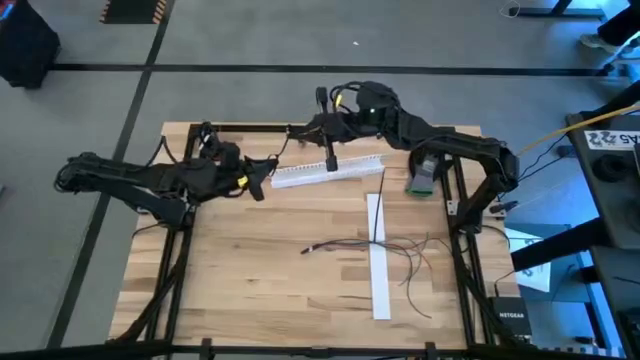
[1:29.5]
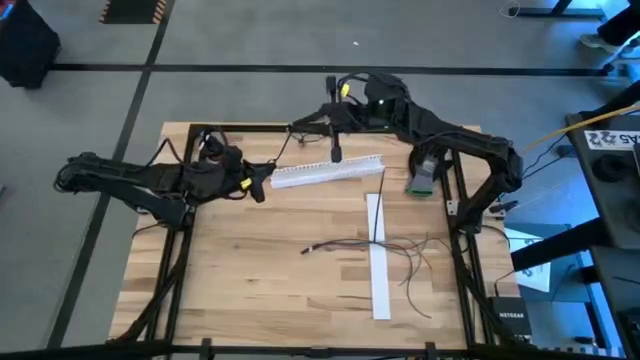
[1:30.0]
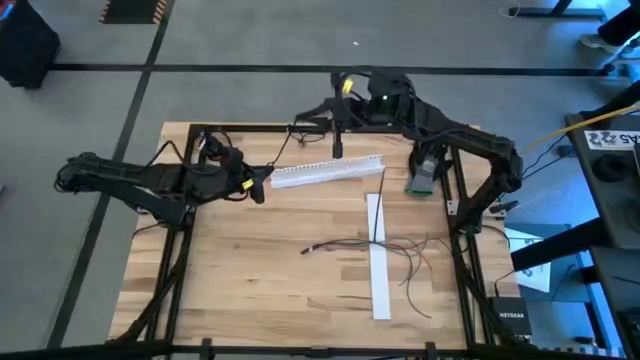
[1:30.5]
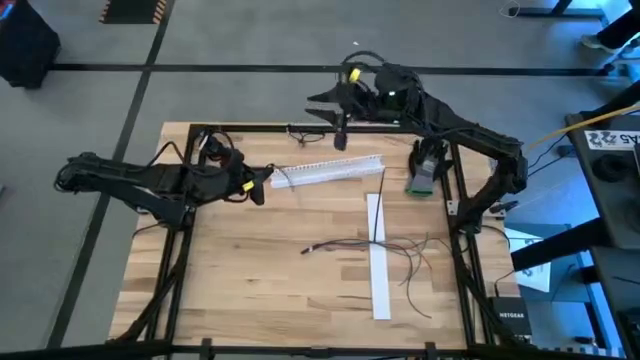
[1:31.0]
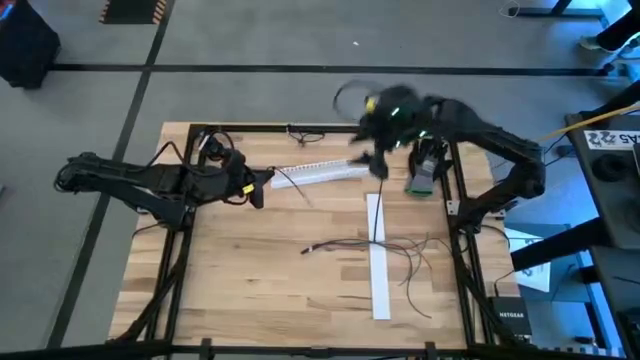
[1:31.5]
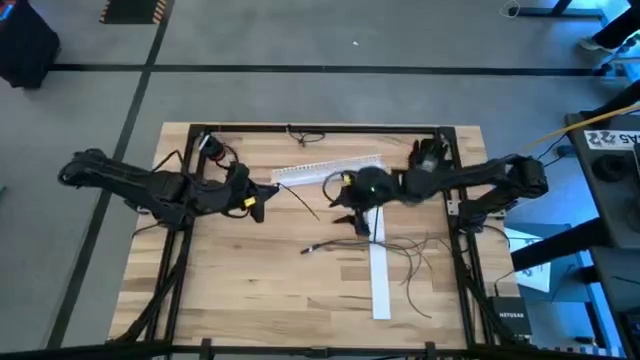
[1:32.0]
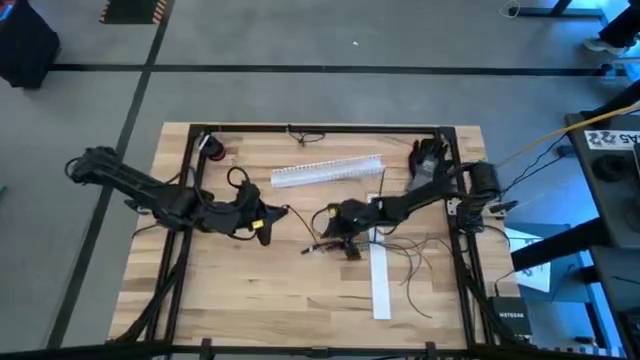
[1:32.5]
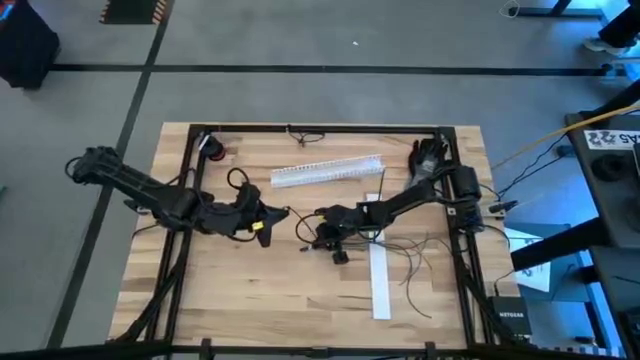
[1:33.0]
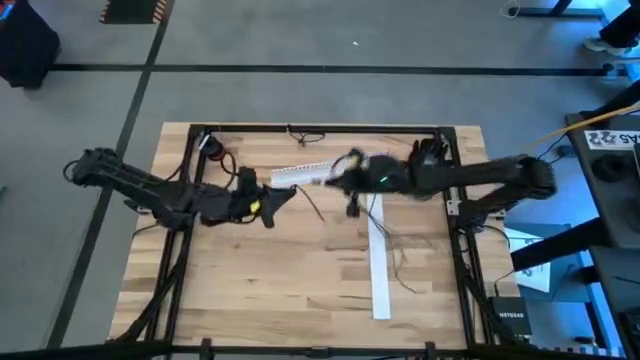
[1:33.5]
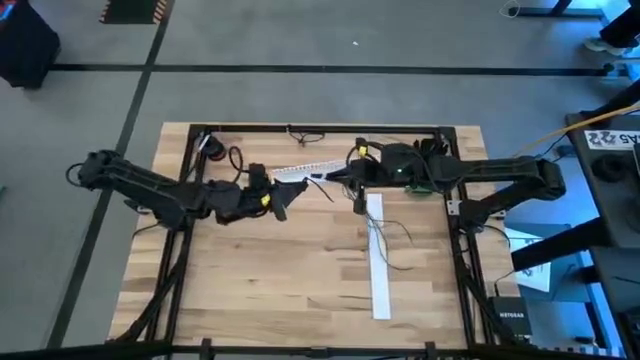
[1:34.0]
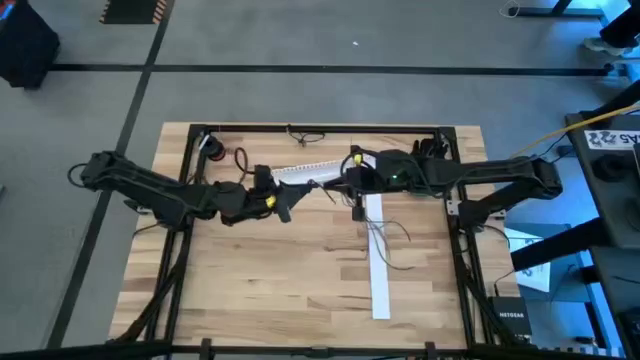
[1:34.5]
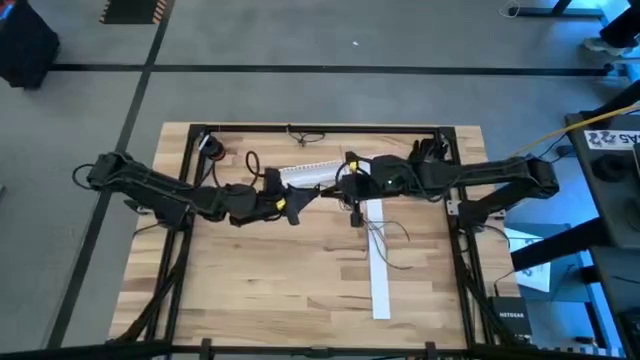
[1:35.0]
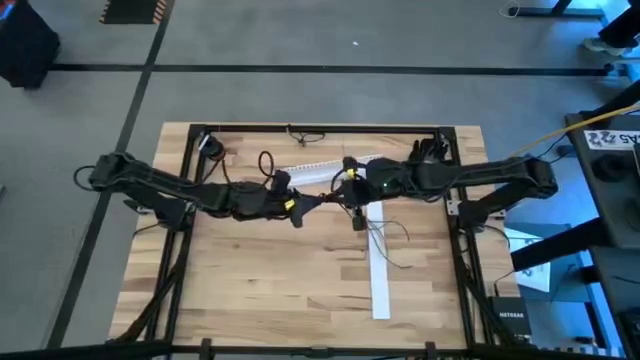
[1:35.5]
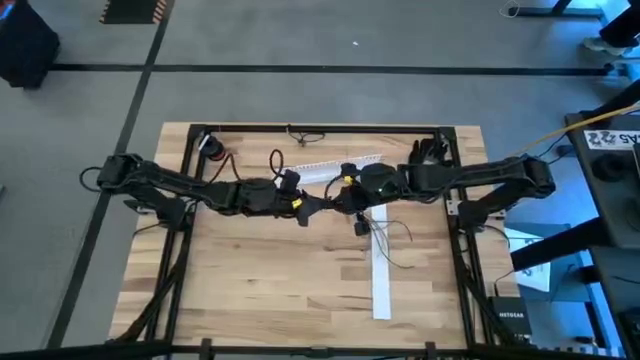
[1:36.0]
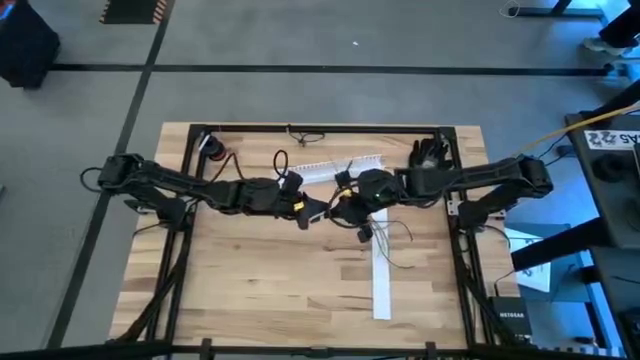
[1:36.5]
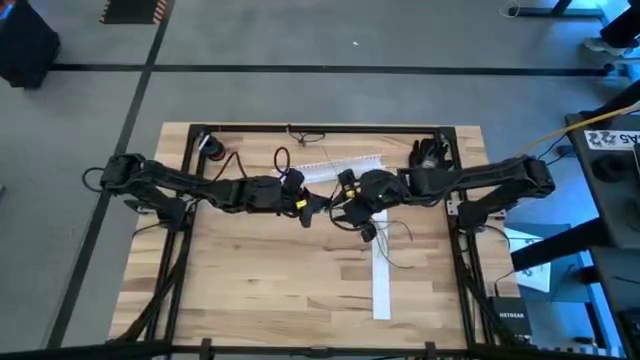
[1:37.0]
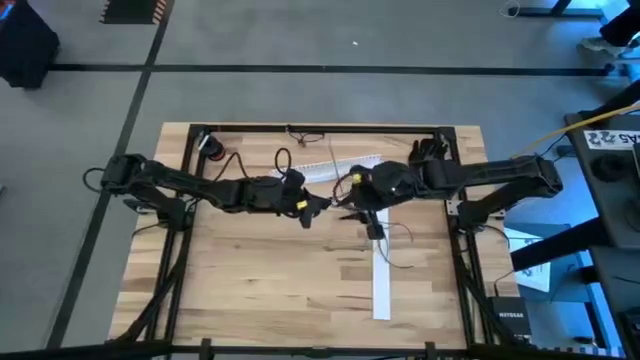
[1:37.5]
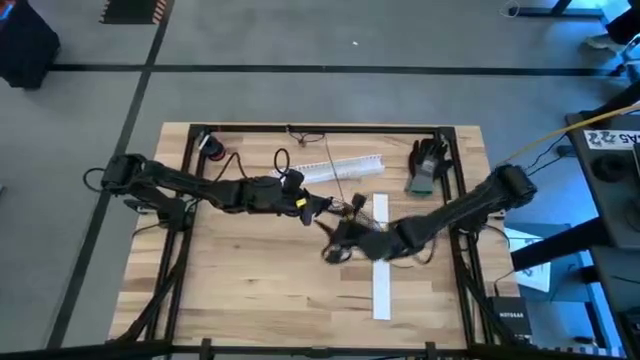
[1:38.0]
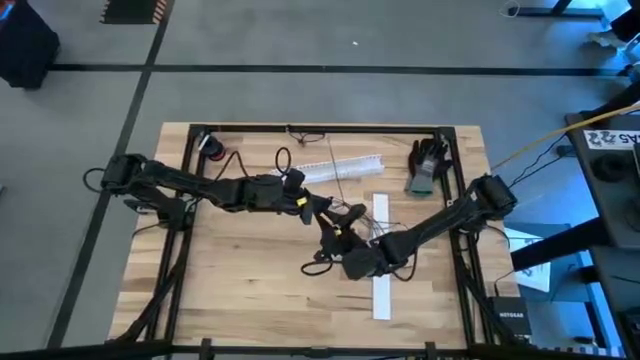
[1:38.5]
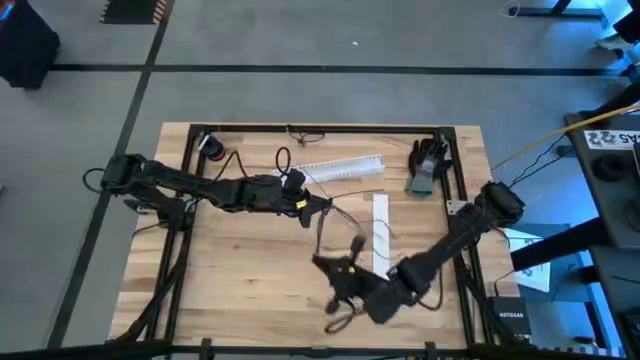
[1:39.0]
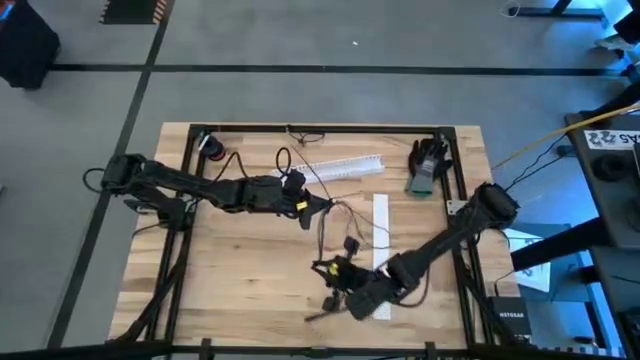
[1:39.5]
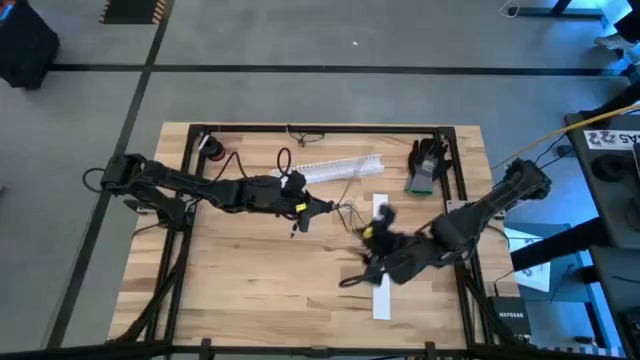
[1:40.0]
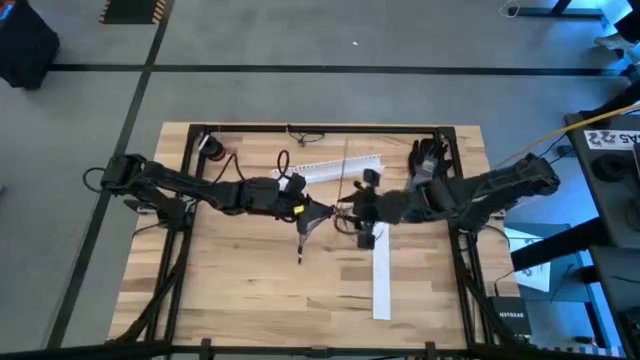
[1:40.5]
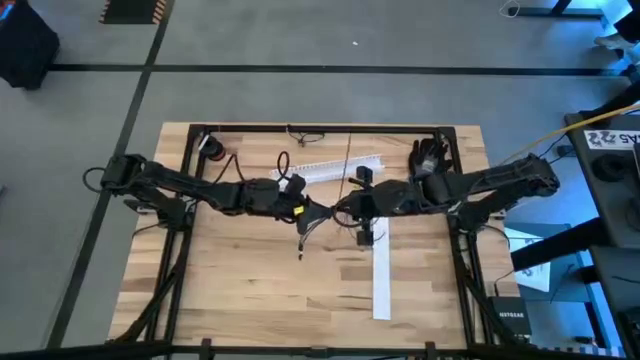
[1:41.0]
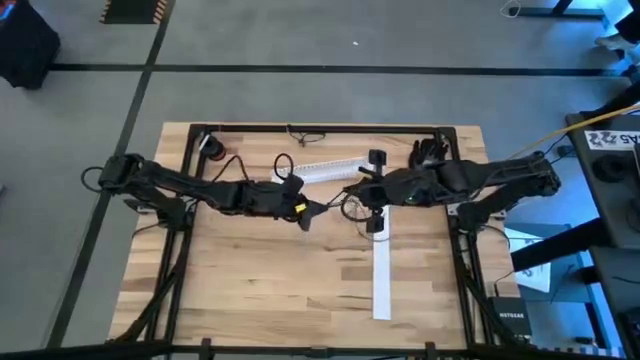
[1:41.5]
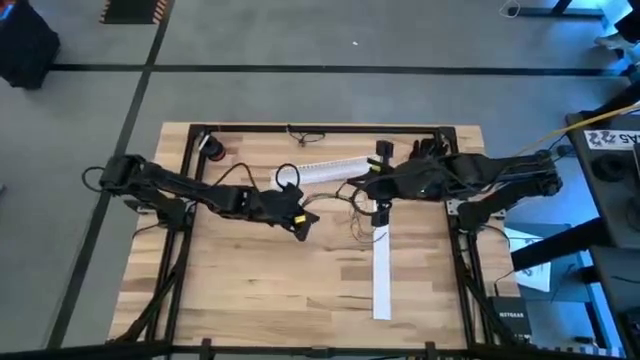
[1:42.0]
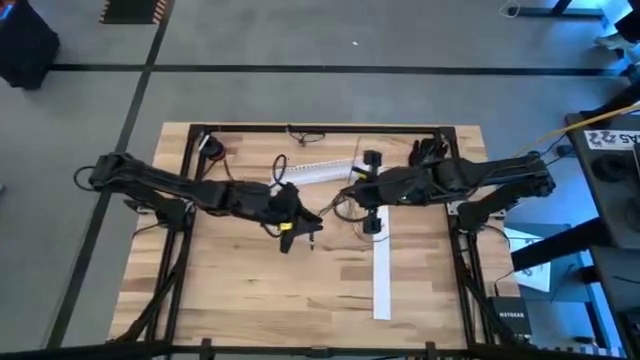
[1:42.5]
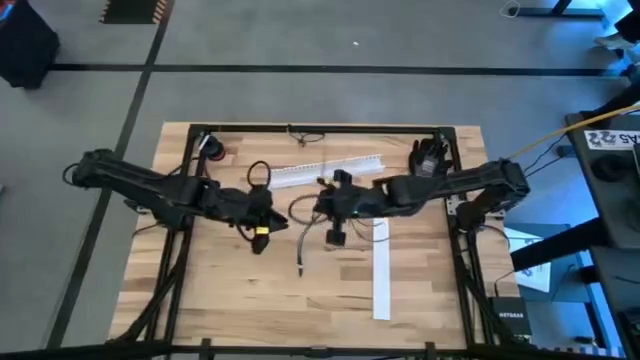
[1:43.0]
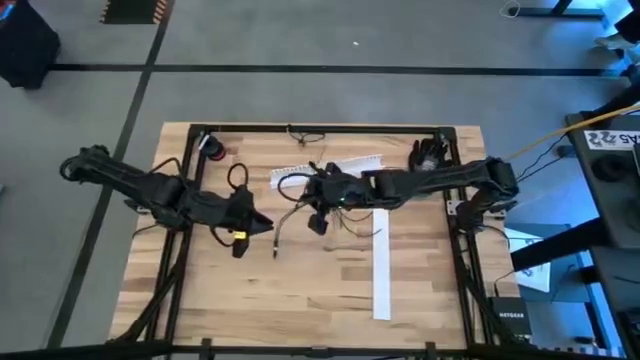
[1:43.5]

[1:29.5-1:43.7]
Task: Ziptie cables
Wrap the black zip-tie around the cable wires
